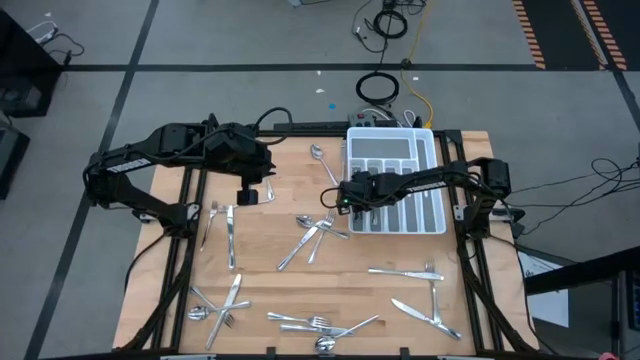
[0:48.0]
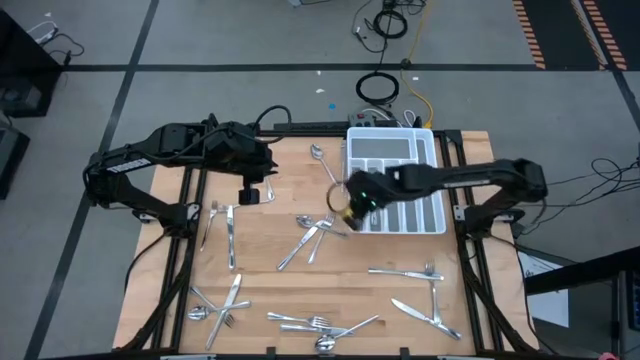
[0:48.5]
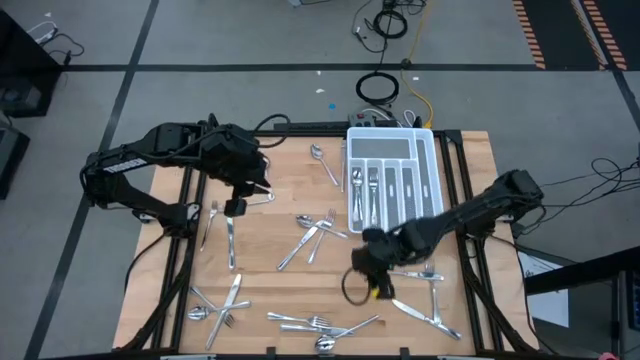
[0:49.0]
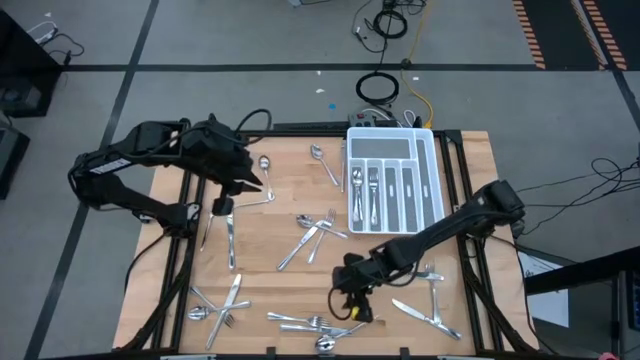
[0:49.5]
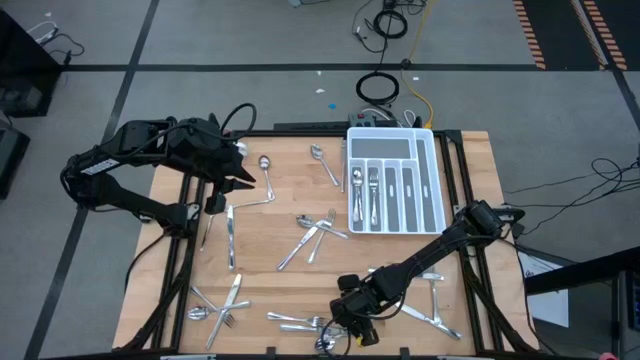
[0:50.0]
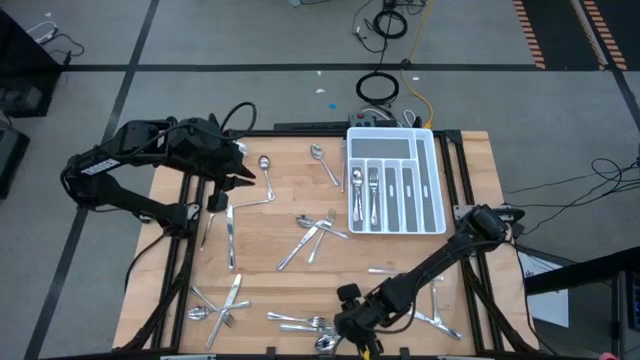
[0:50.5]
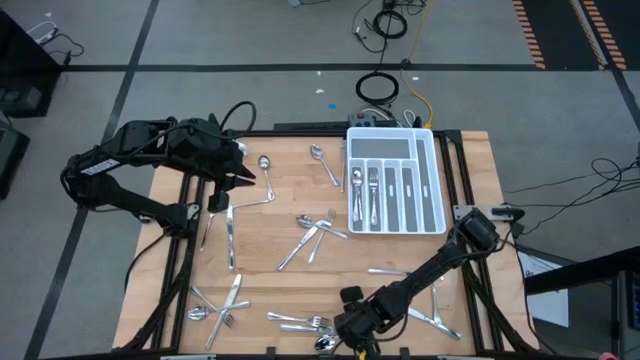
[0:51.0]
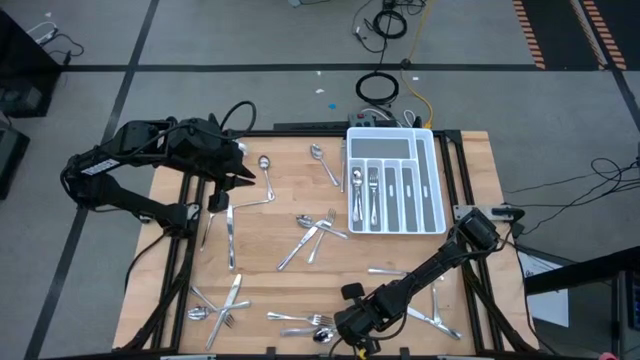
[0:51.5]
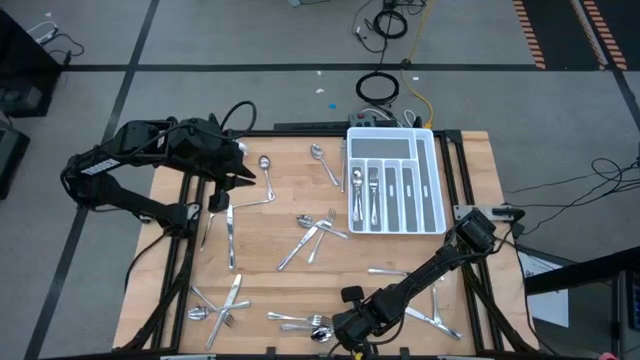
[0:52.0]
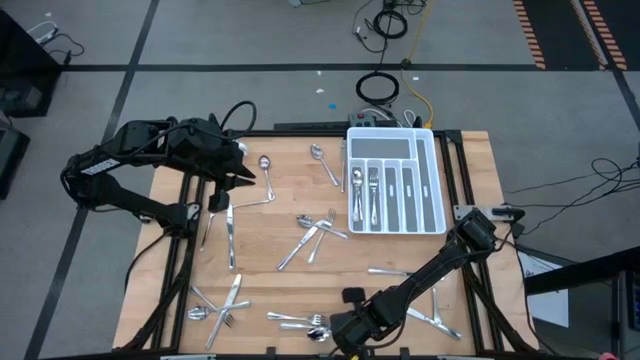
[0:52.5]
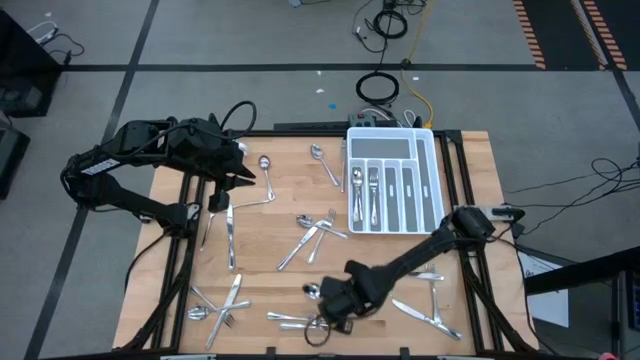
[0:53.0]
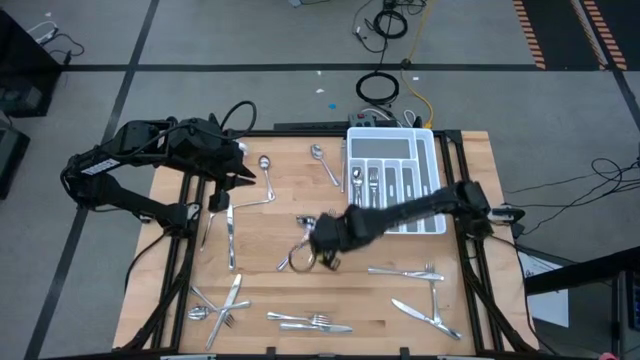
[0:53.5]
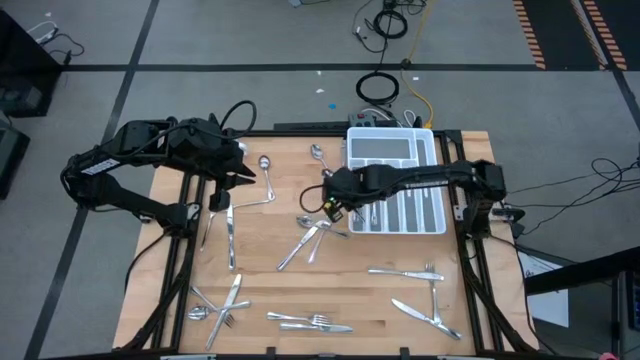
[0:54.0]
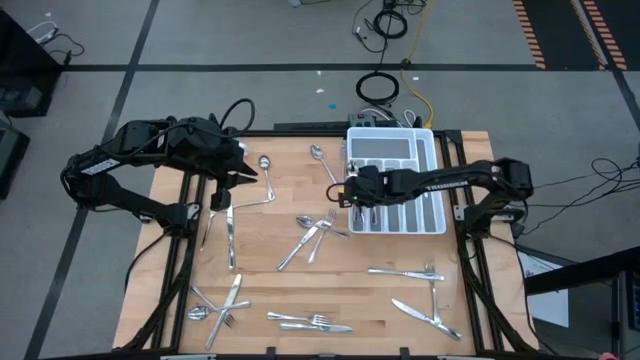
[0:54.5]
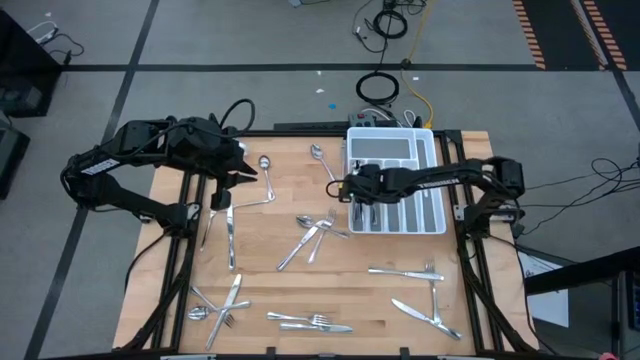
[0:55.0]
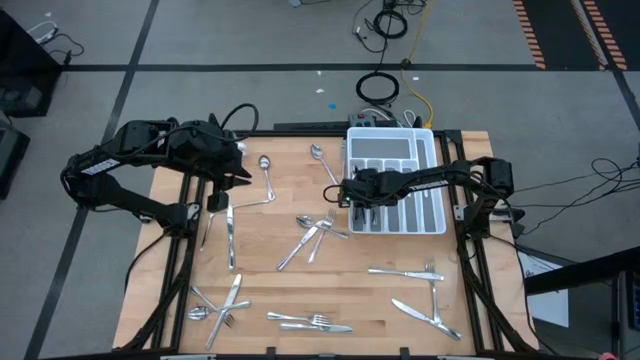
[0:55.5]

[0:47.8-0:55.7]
Task: Sort silverware
Put the silver spoon into the silverware tray

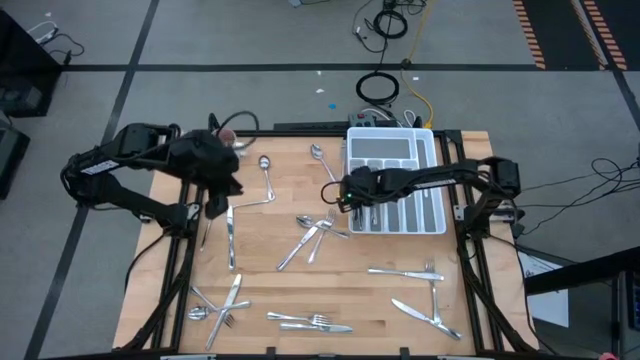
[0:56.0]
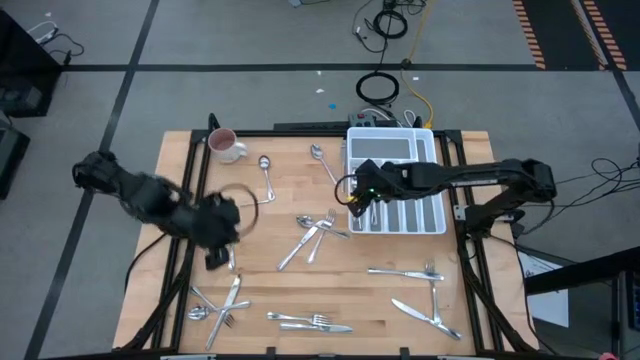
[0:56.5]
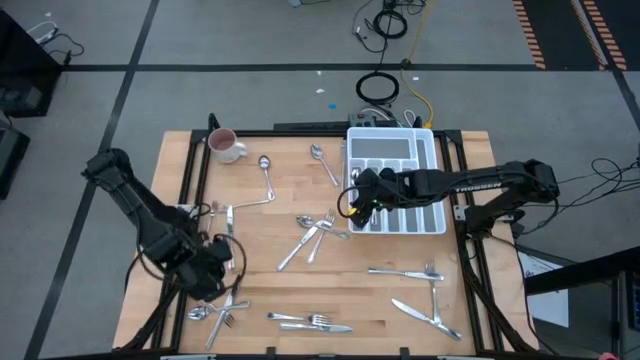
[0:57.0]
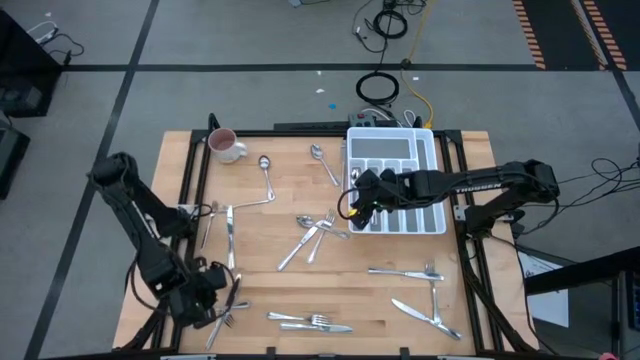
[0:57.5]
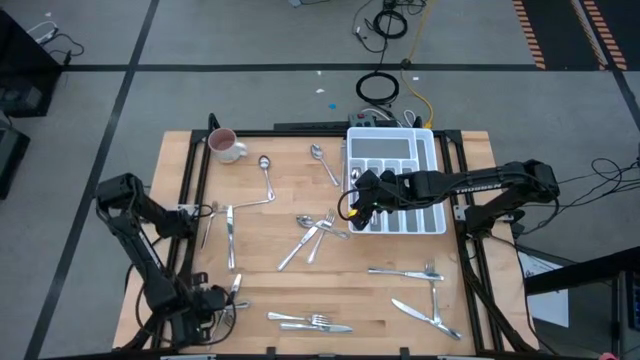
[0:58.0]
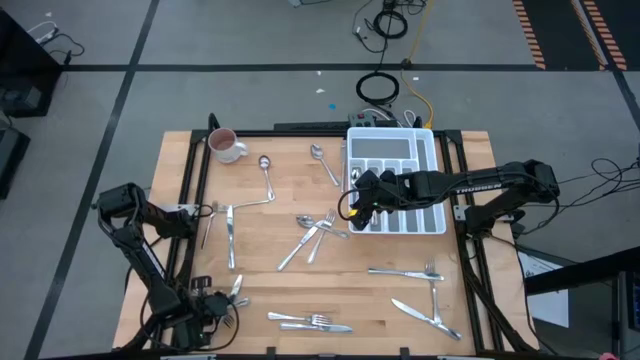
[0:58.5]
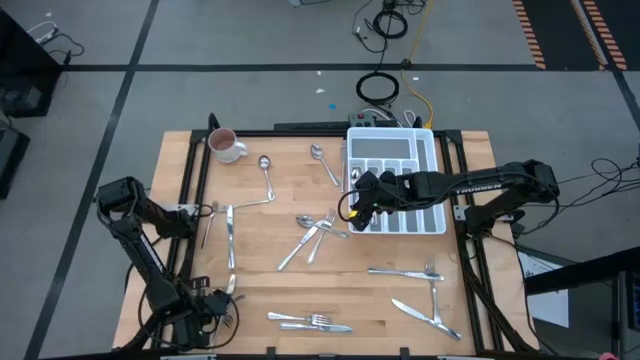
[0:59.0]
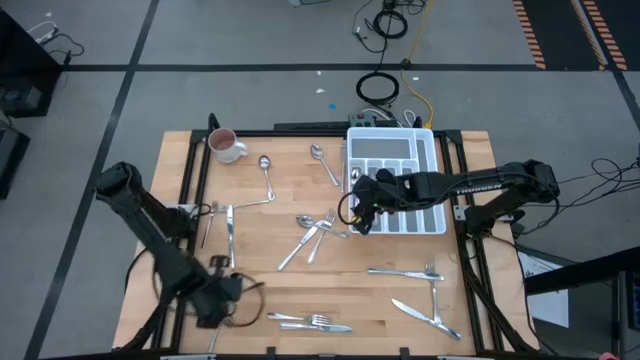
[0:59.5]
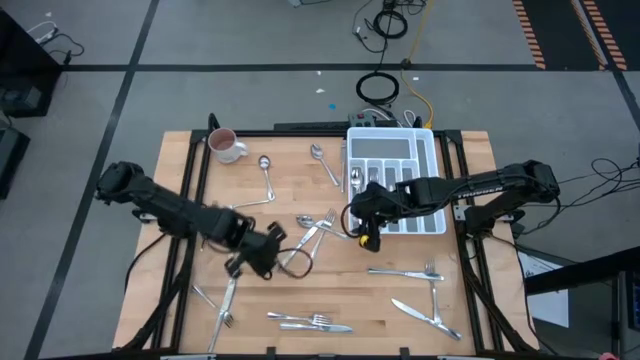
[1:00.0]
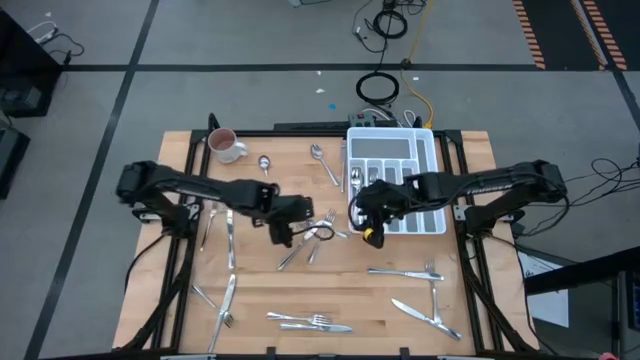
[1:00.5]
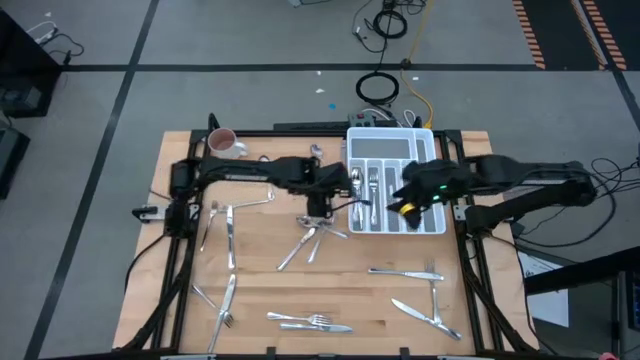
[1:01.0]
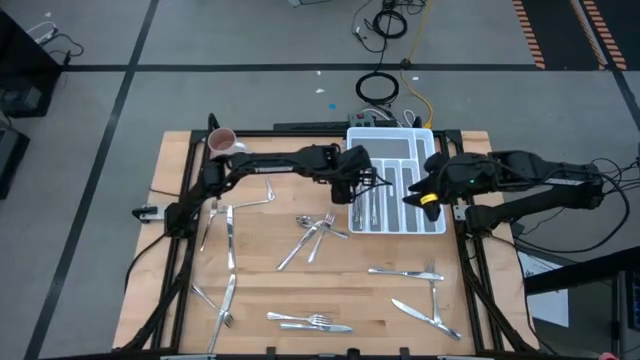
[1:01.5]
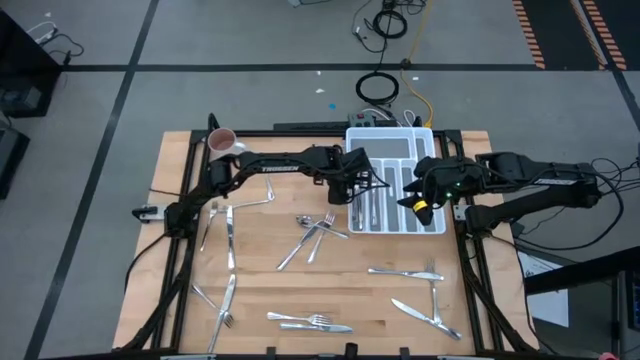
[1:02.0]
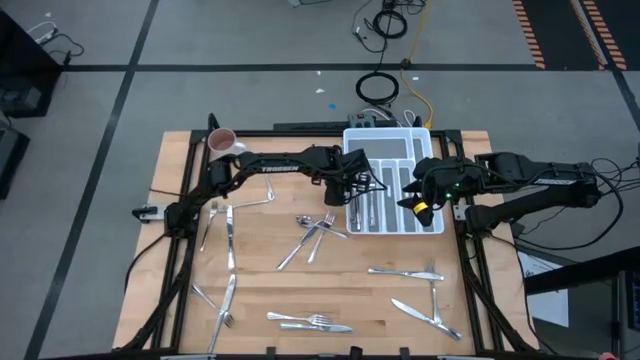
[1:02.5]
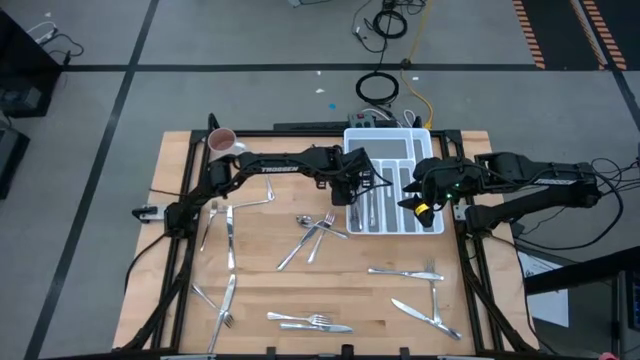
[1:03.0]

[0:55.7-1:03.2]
Put the silver spoon into the silverware tray

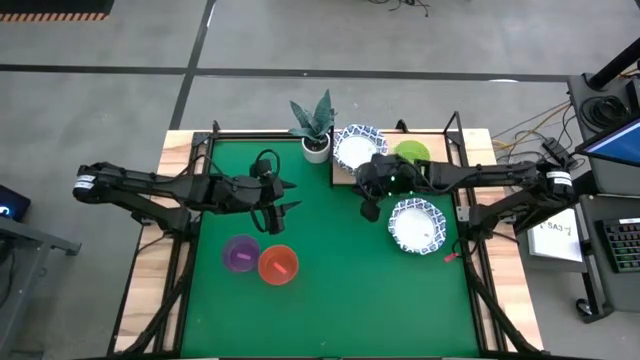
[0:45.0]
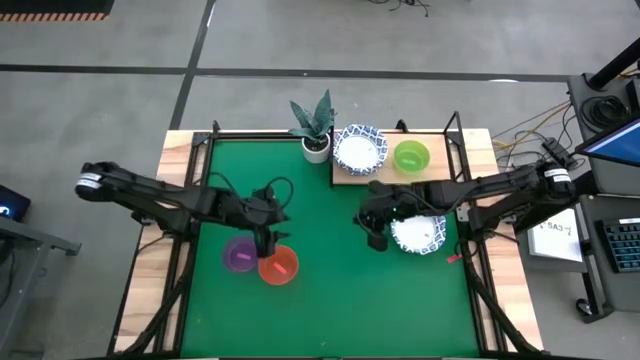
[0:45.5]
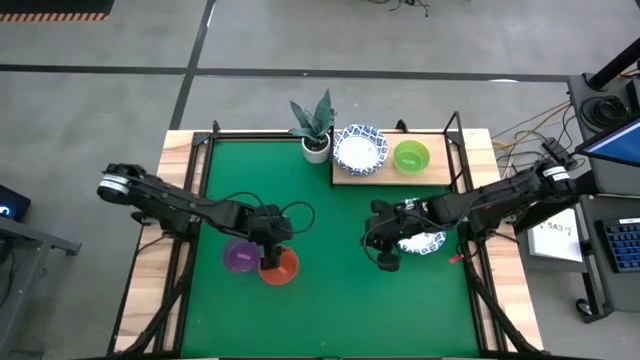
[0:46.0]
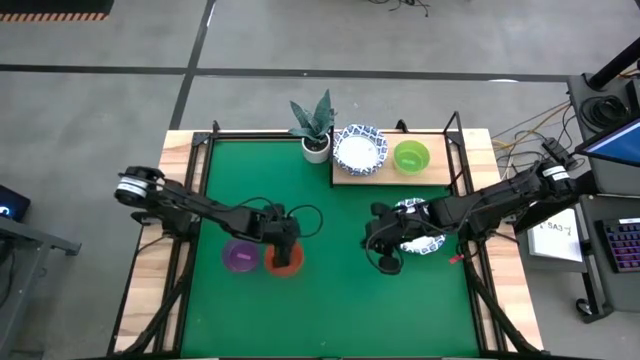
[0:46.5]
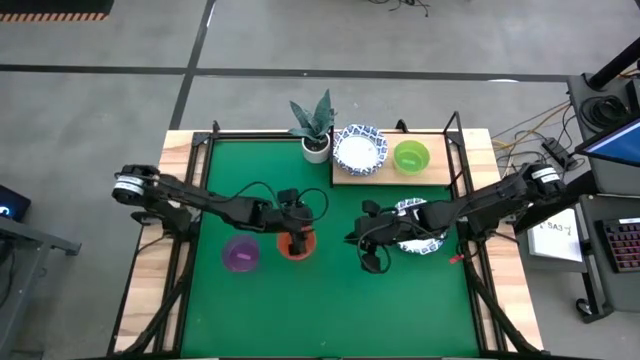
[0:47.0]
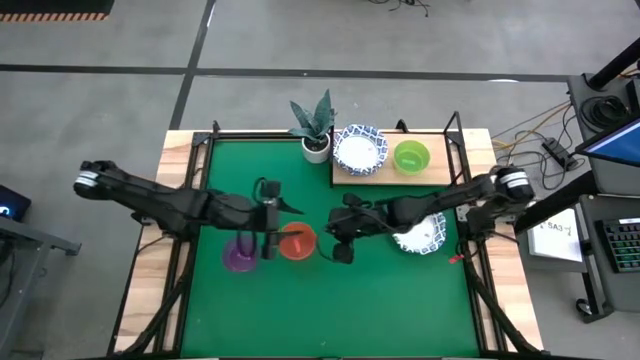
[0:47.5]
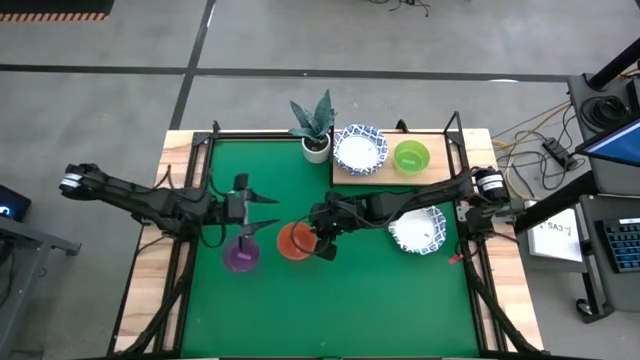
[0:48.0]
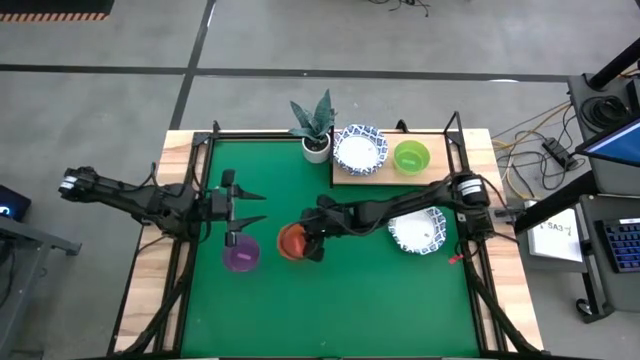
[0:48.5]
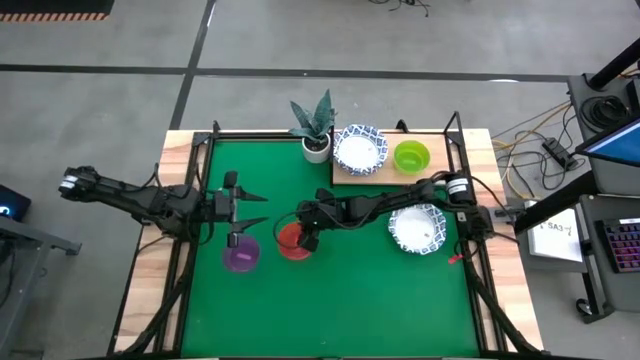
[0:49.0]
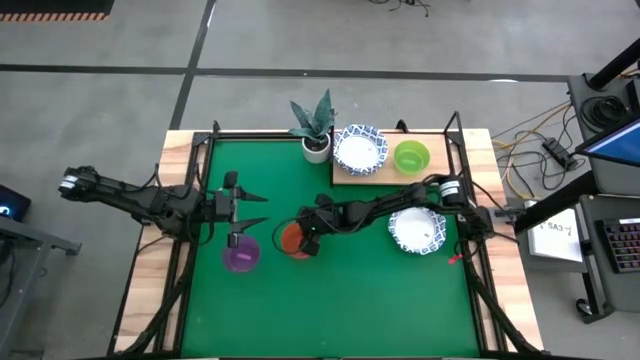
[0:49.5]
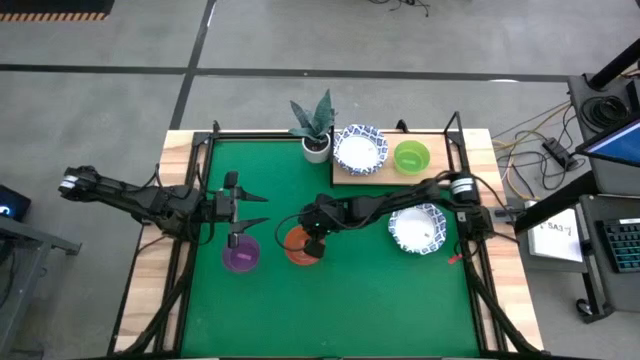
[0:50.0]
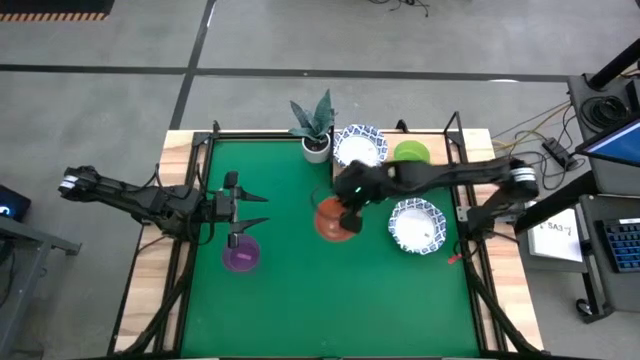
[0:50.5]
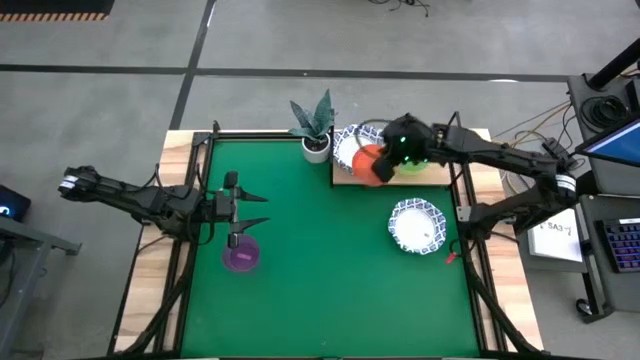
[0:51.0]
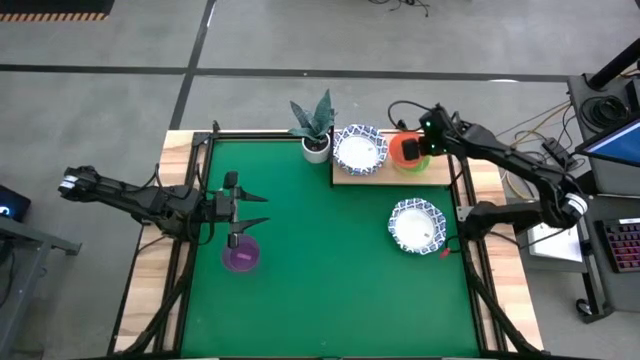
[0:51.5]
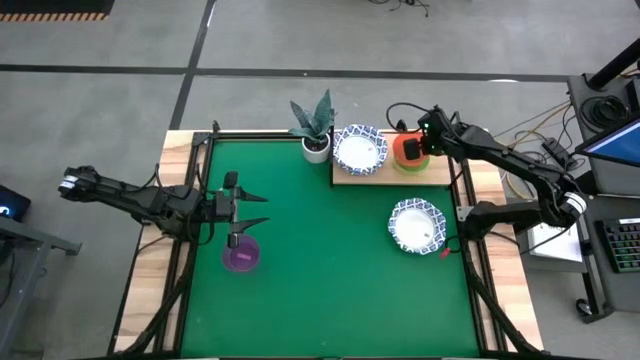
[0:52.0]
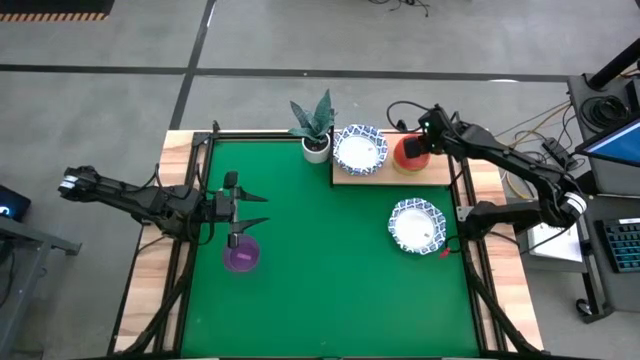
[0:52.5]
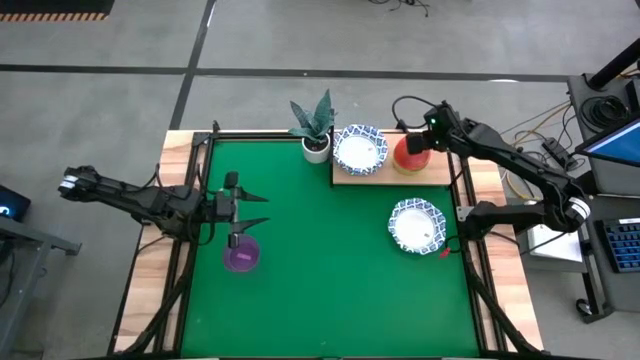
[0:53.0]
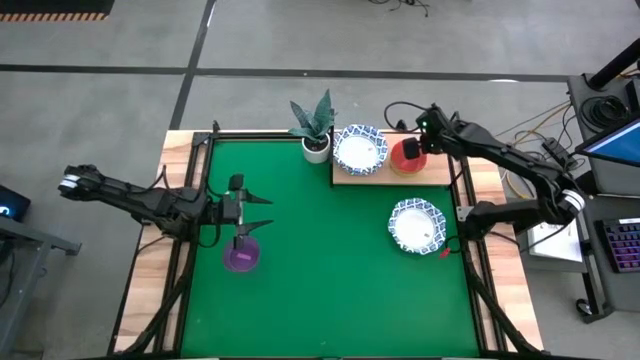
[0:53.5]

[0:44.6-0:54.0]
Task: Place and stack bowls onto a shelf
Stack the orange bowl on top of the green bowl
